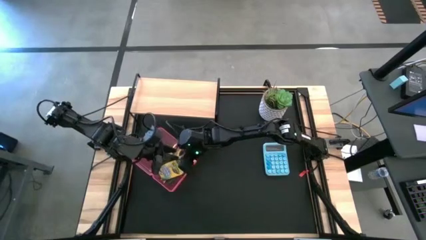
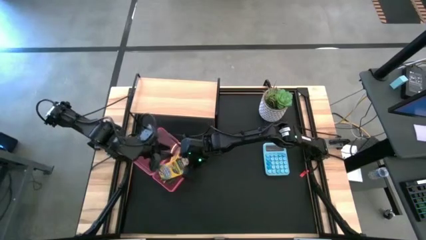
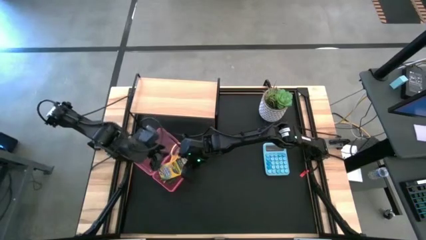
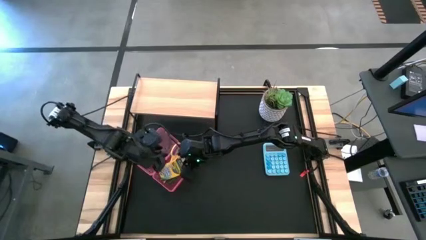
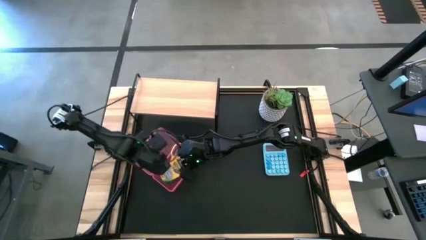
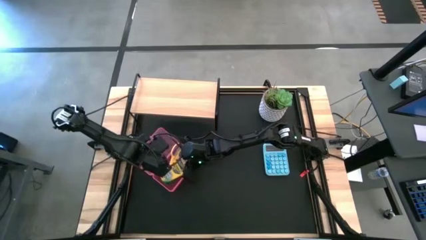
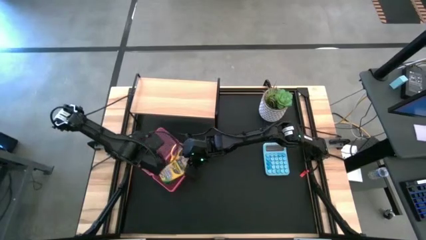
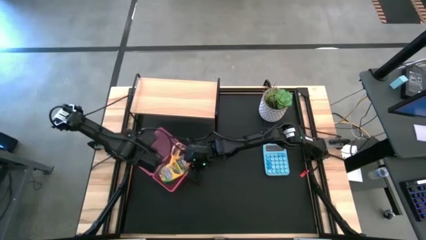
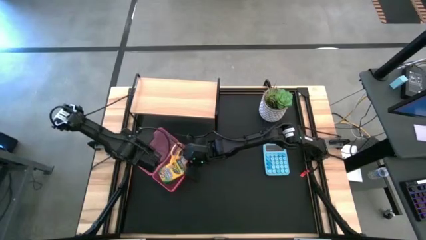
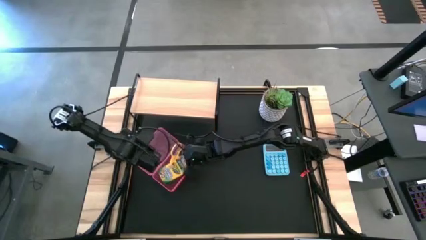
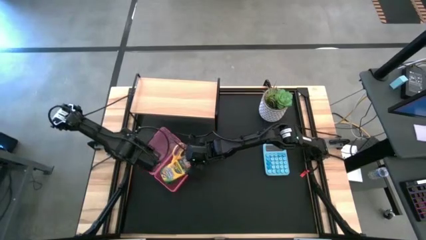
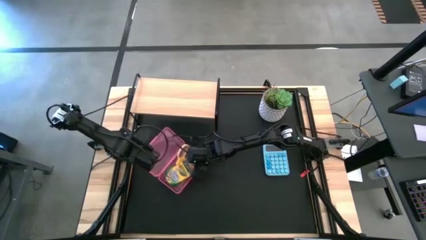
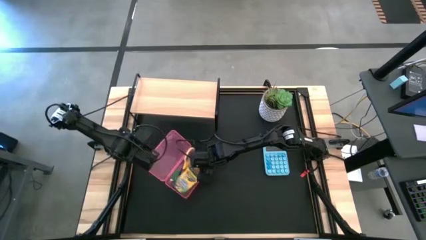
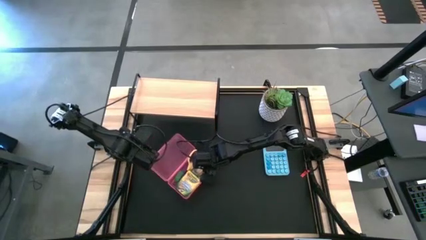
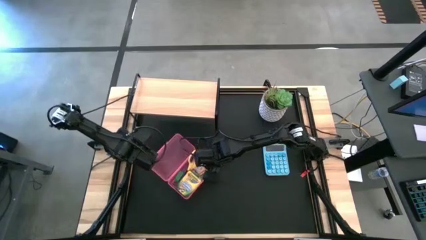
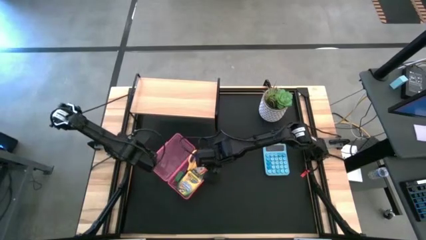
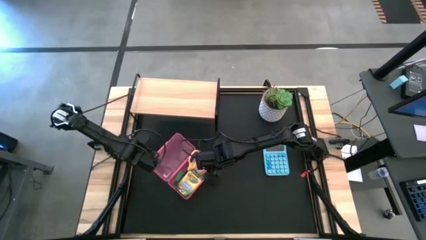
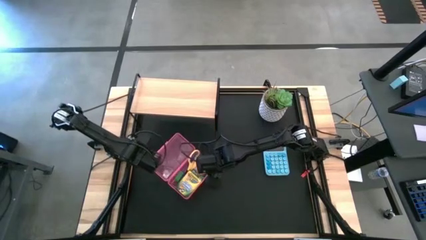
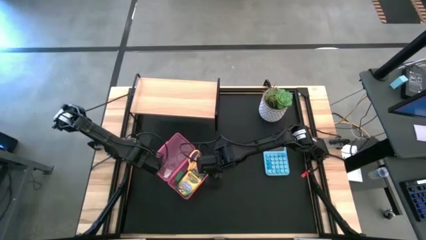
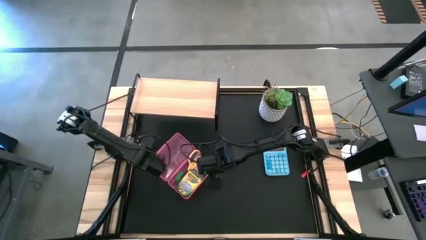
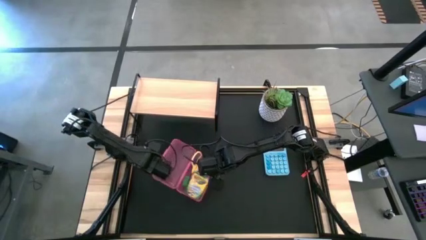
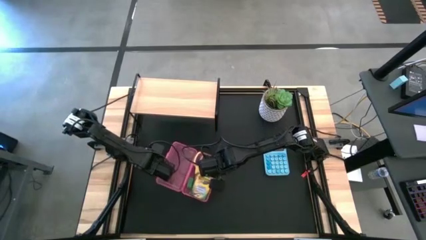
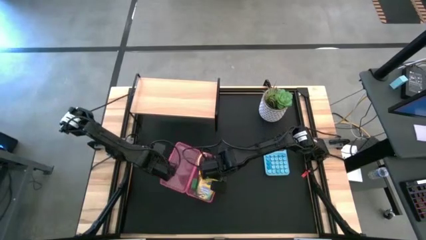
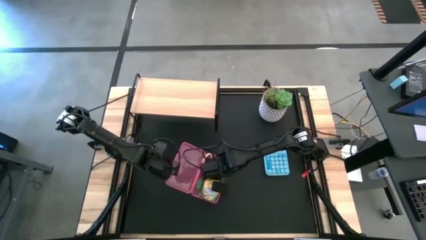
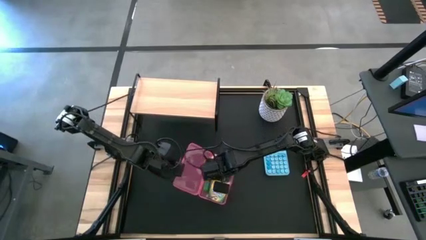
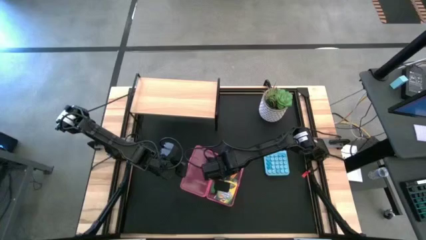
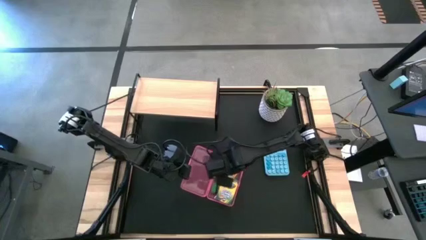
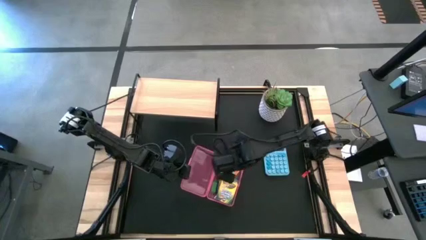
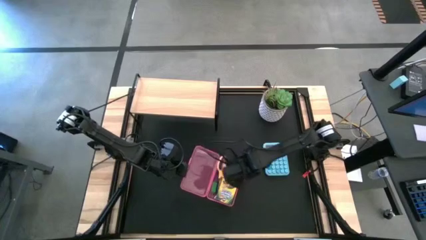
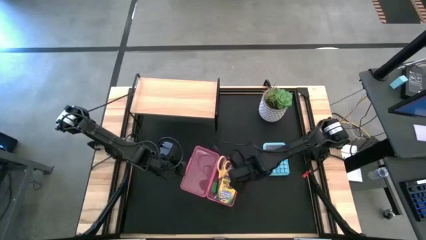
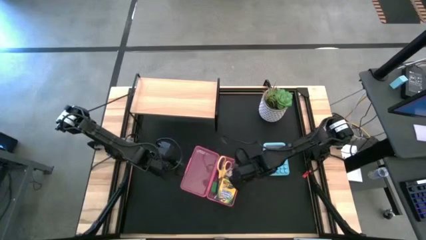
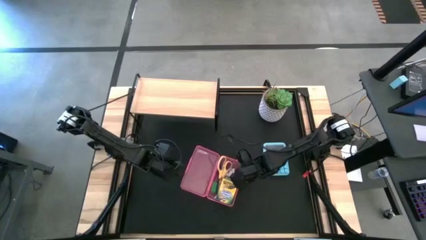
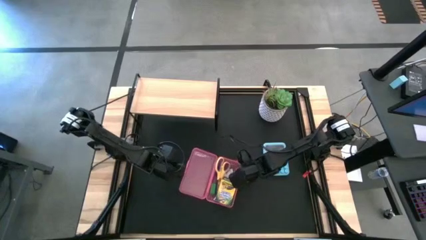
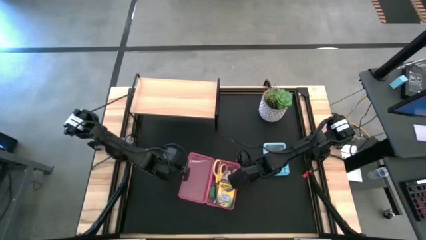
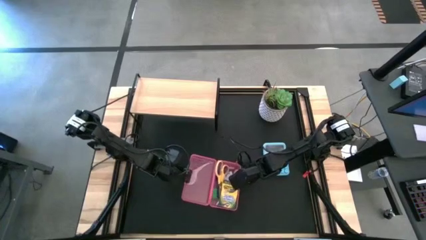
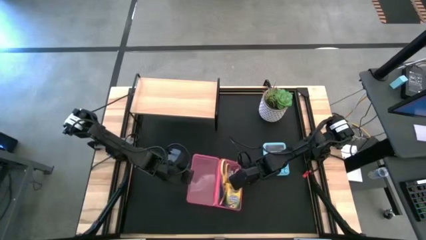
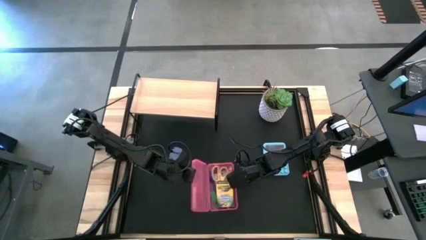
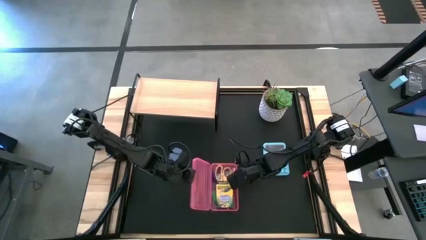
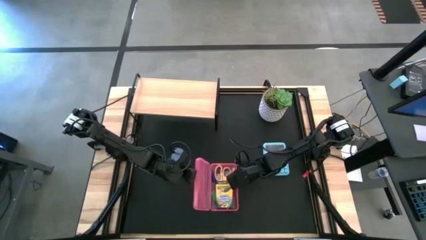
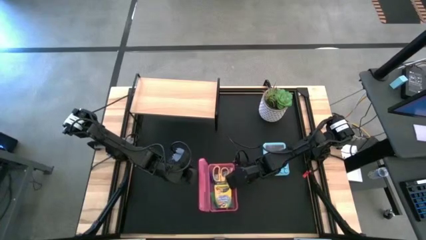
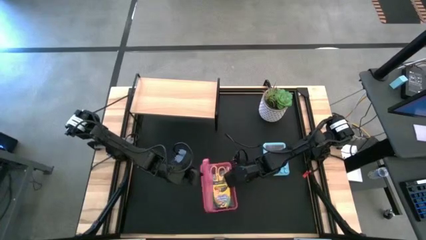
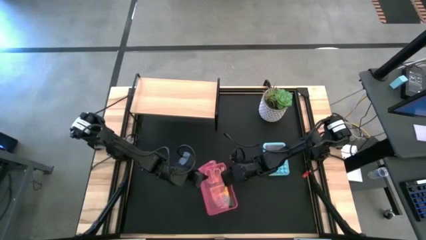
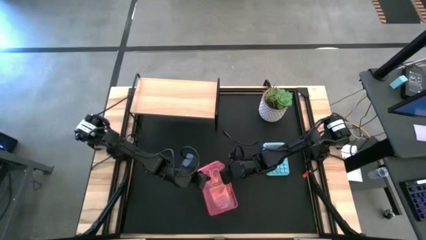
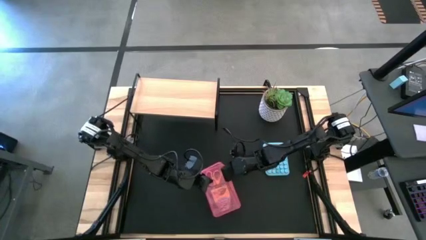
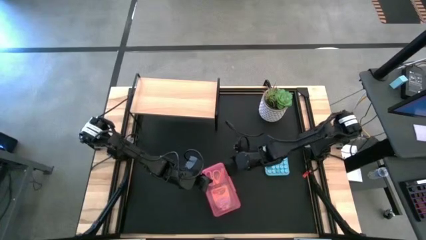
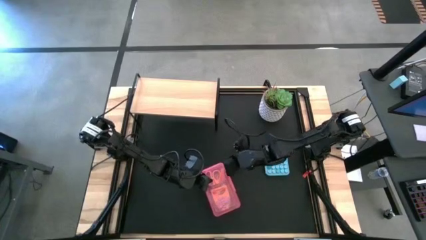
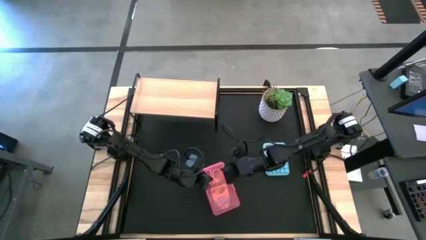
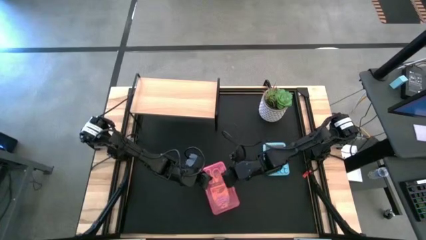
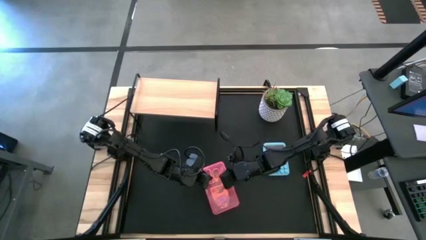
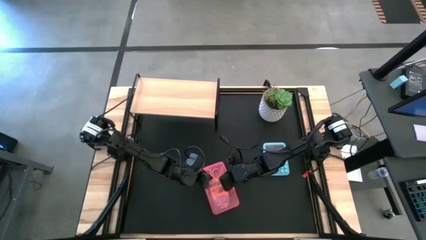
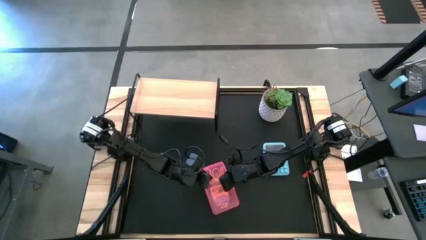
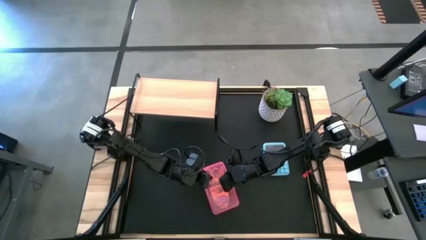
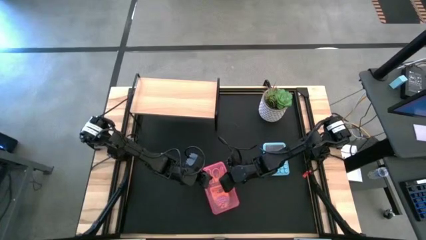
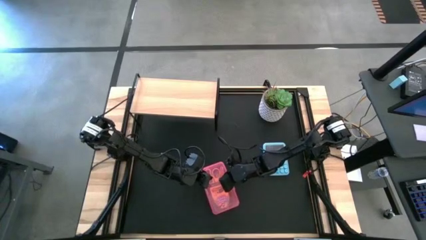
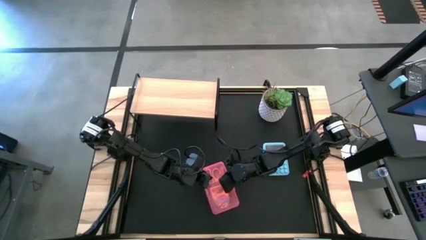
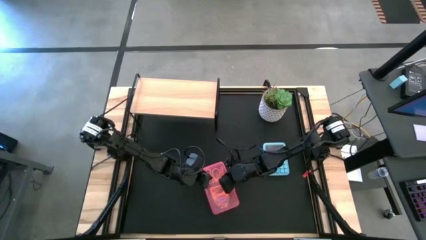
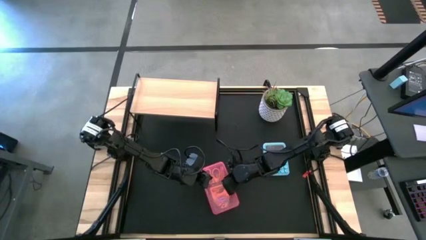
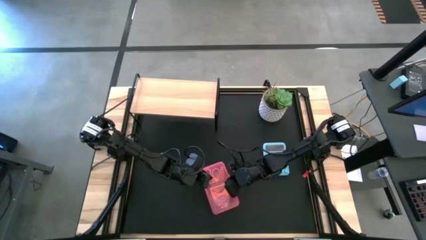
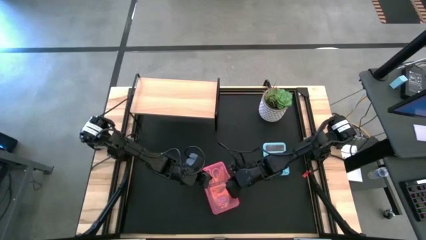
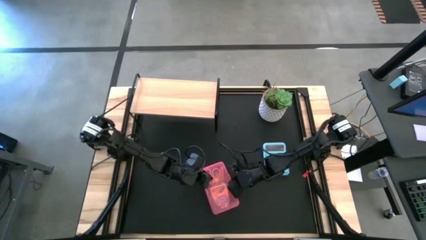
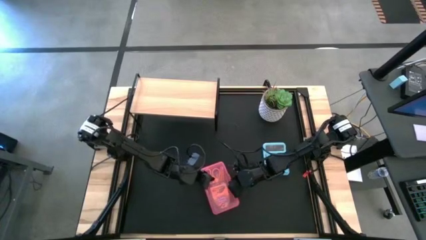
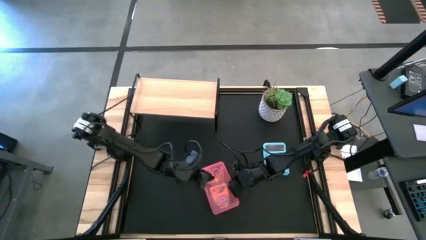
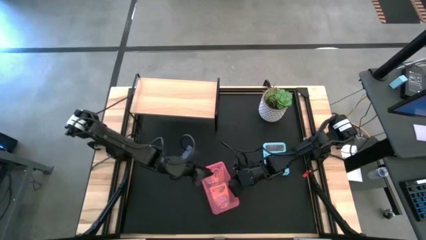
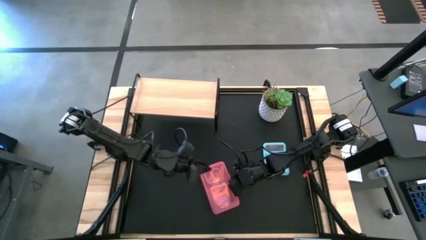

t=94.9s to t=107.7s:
Task: Pack school essentials
Close the pencil box

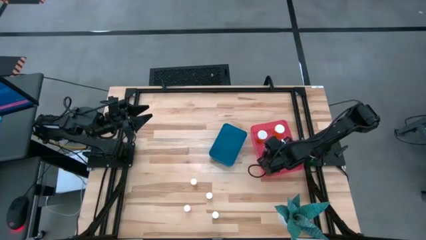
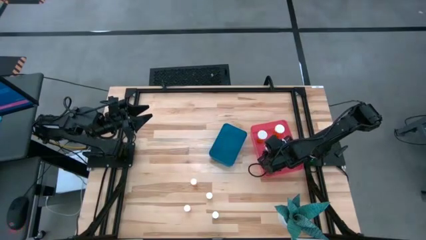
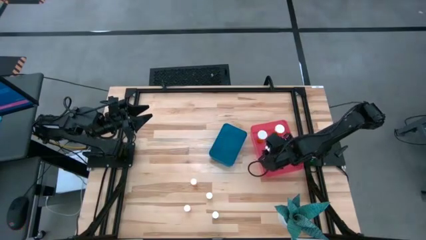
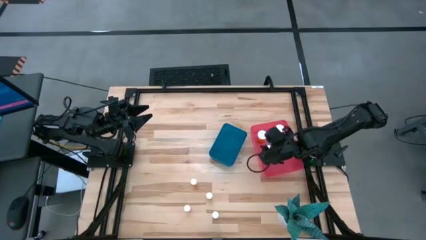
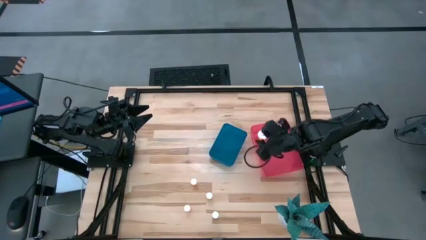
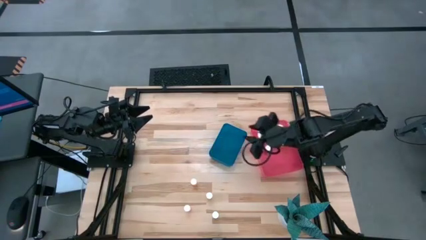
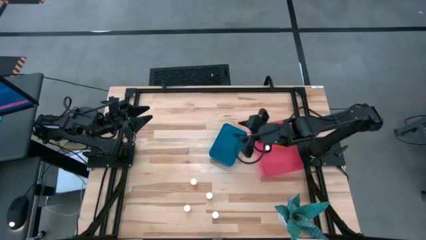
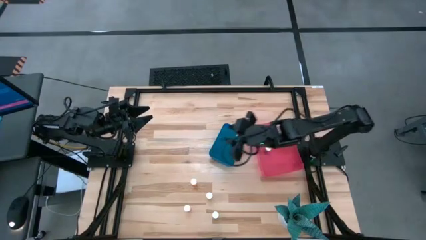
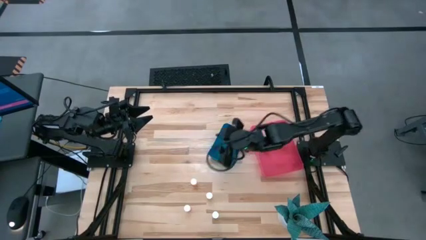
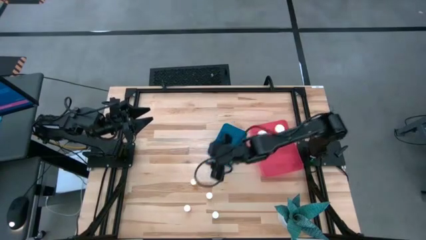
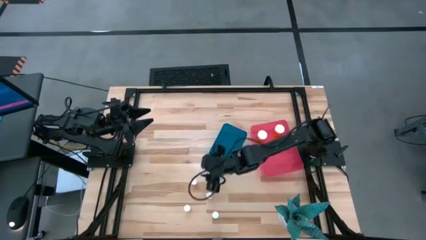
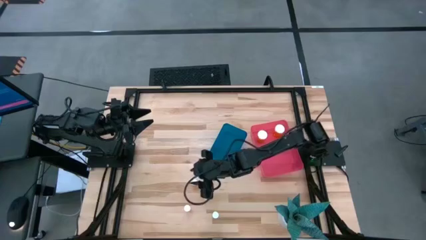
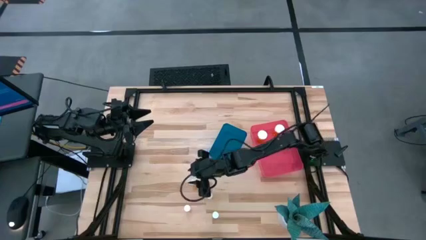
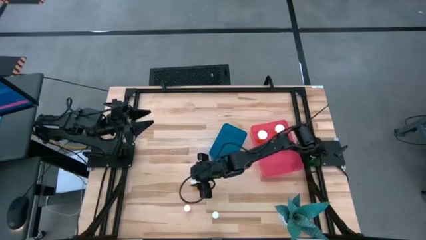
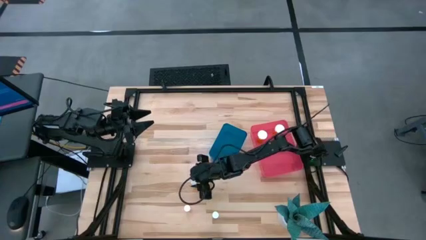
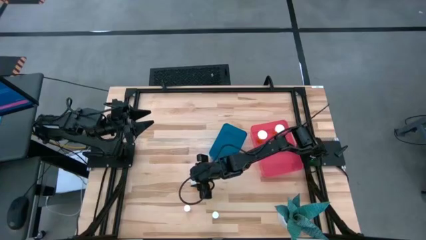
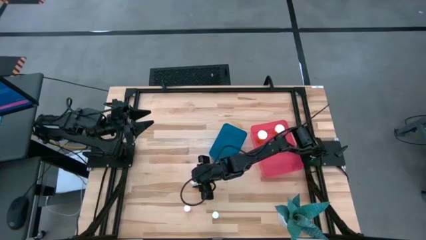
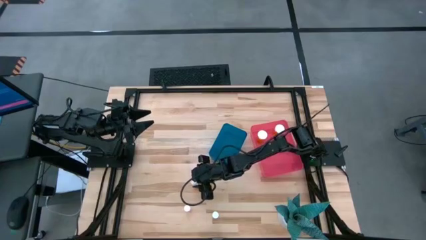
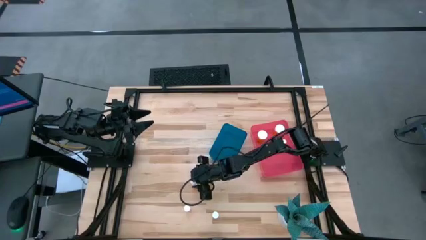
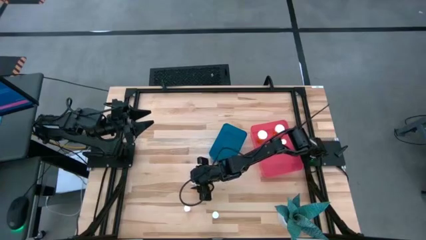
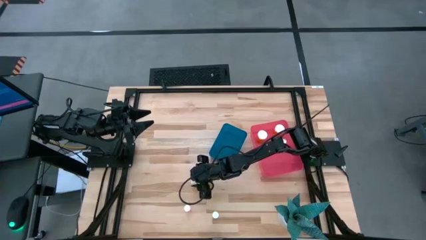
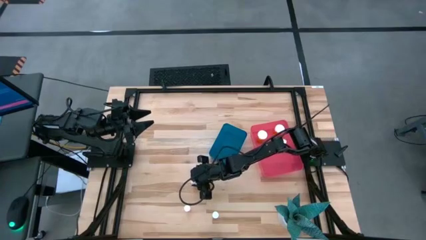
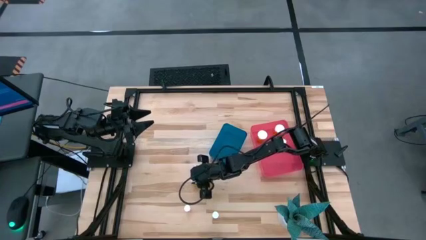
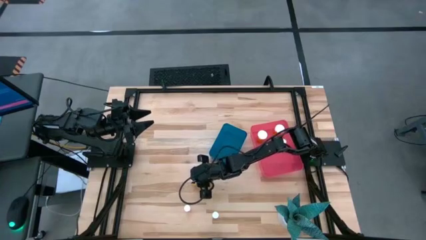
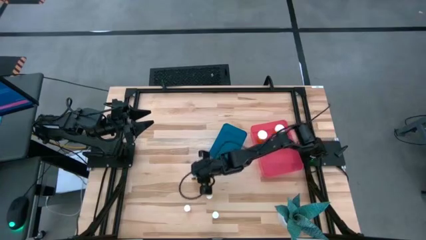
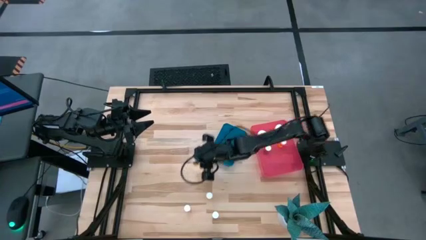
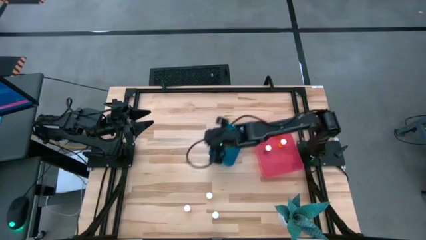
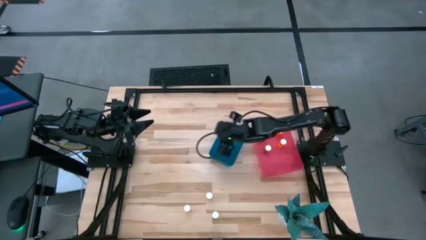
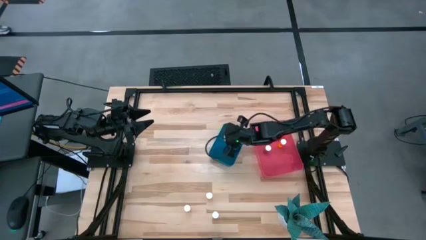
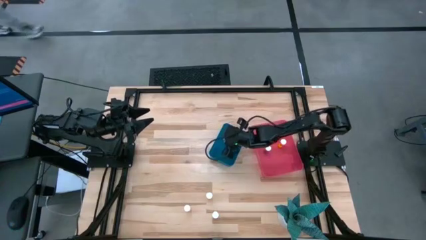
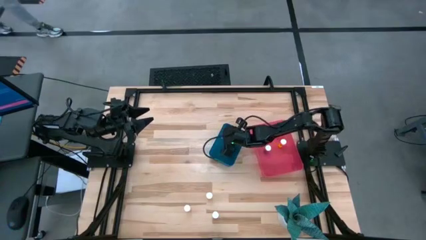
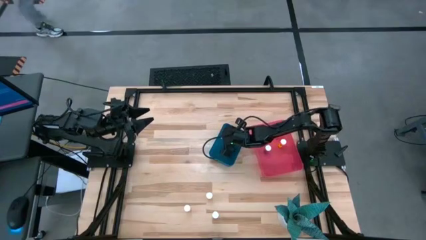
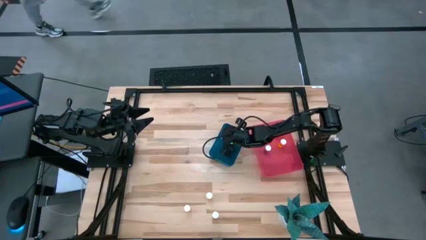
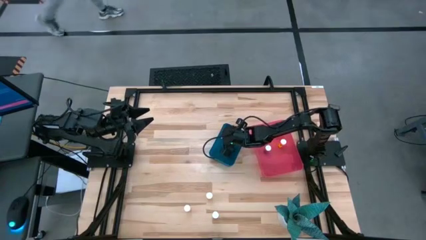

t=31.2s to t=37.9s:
Task: Pick and place medicine bottles into bin by pill shape (circle, oval)
Put the orange tablet bottle into the blue bin
